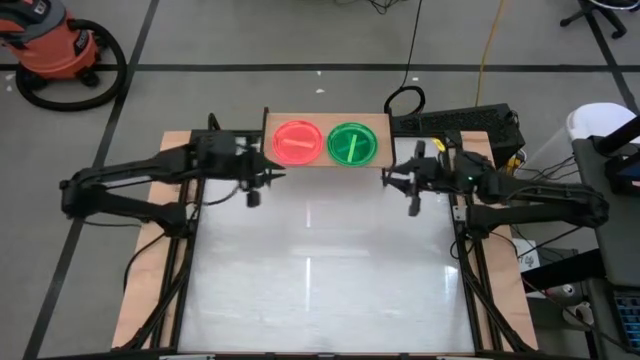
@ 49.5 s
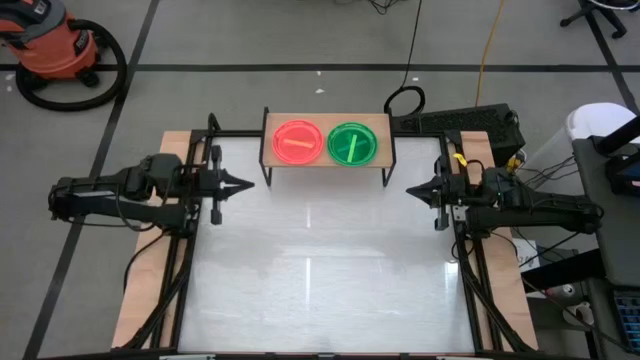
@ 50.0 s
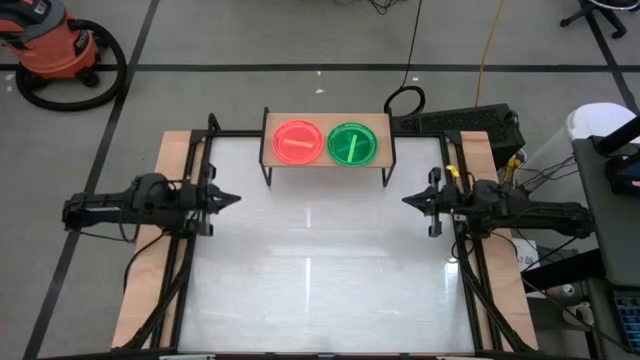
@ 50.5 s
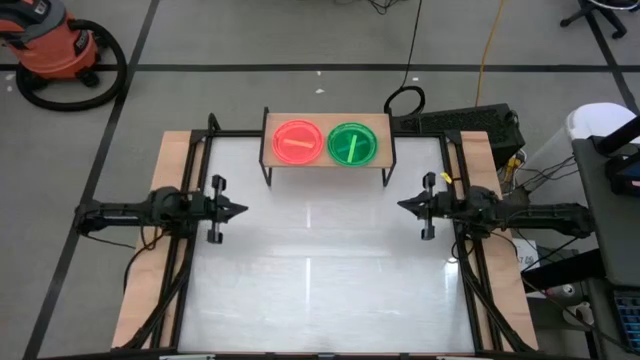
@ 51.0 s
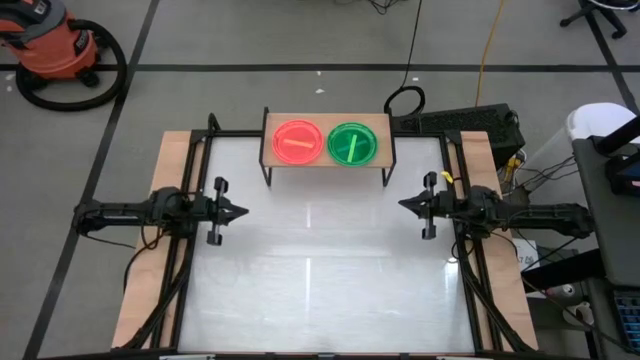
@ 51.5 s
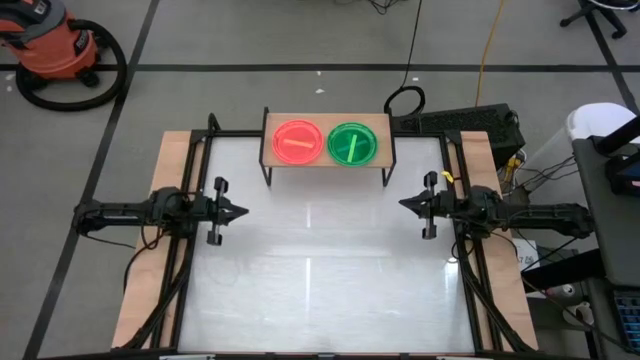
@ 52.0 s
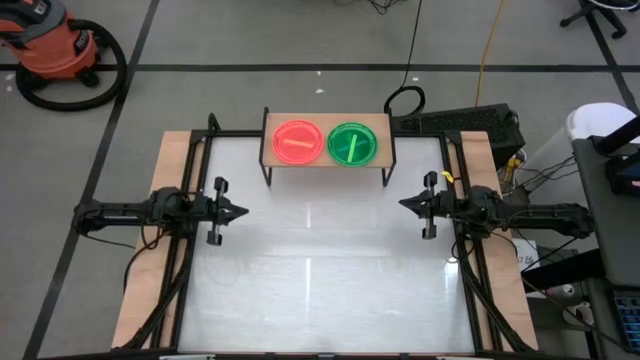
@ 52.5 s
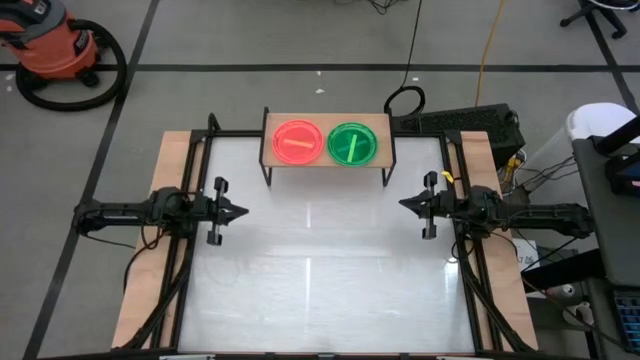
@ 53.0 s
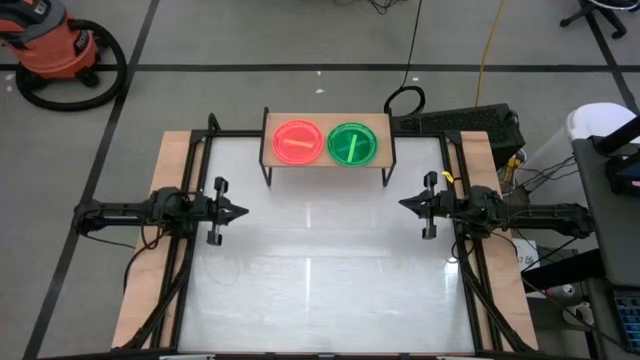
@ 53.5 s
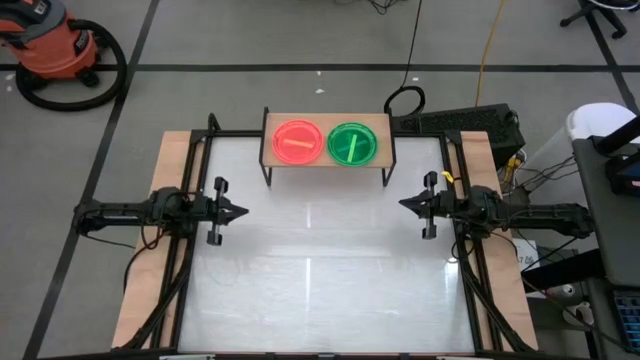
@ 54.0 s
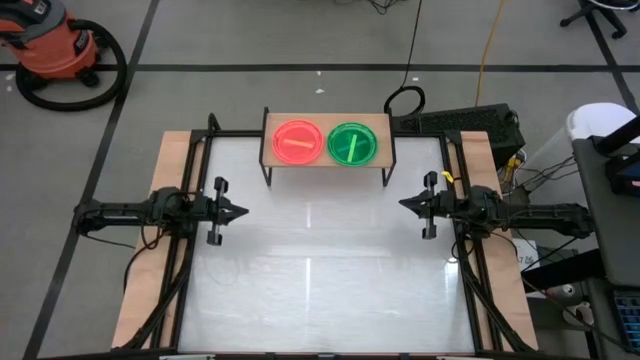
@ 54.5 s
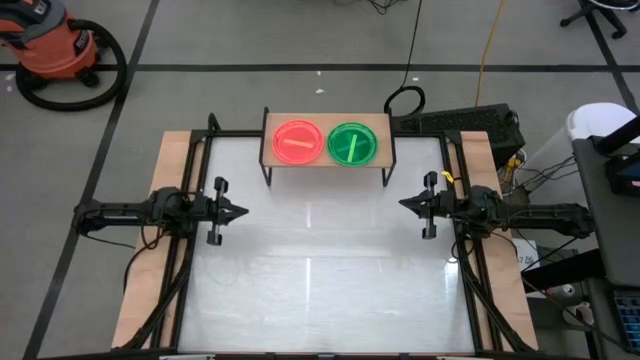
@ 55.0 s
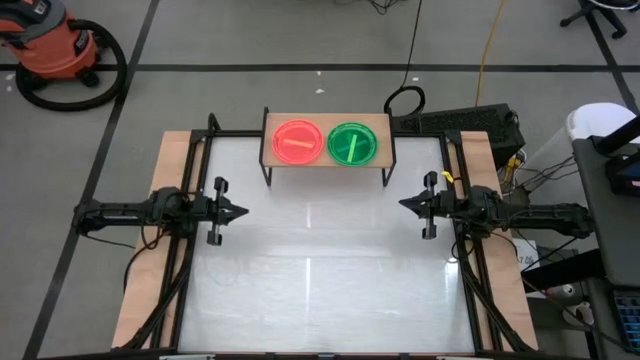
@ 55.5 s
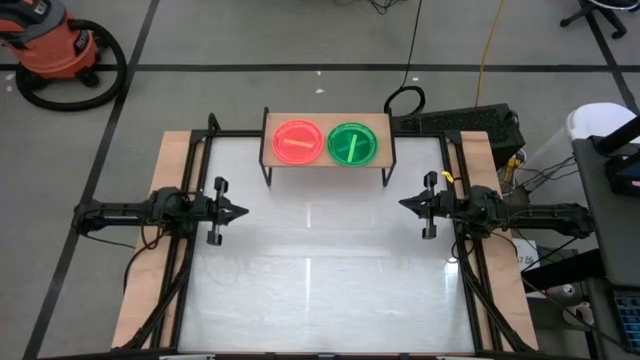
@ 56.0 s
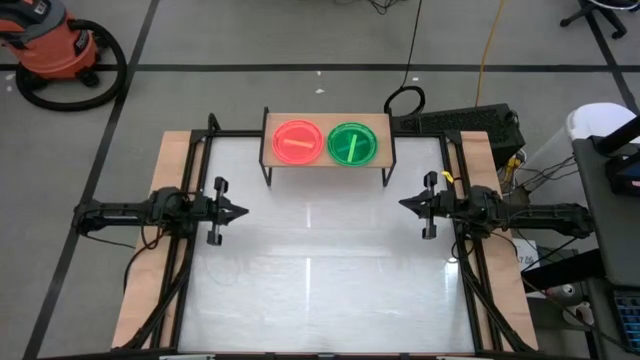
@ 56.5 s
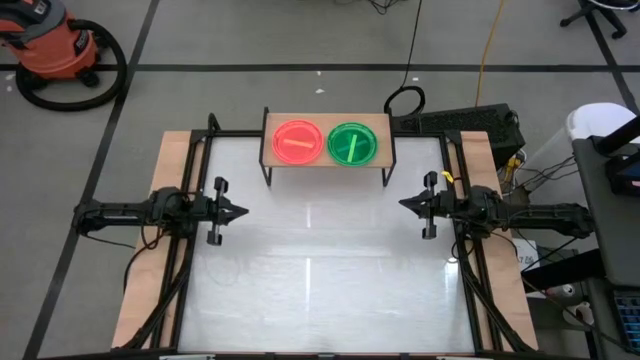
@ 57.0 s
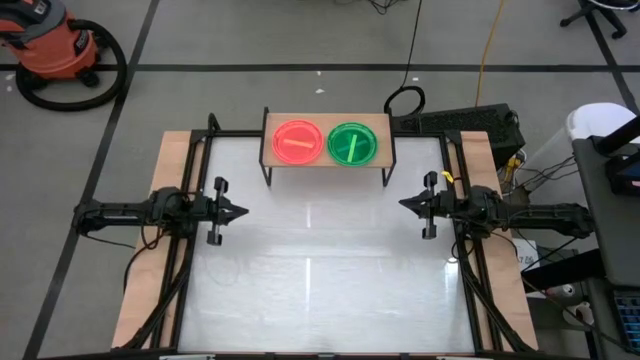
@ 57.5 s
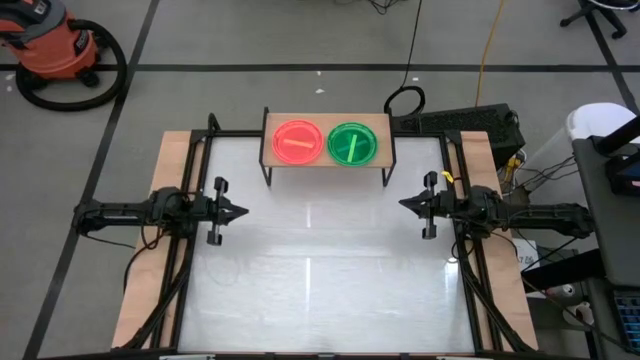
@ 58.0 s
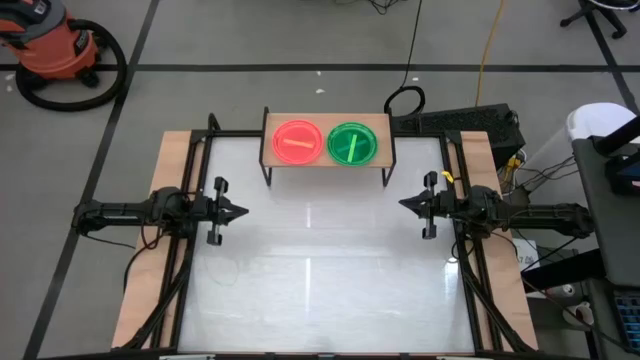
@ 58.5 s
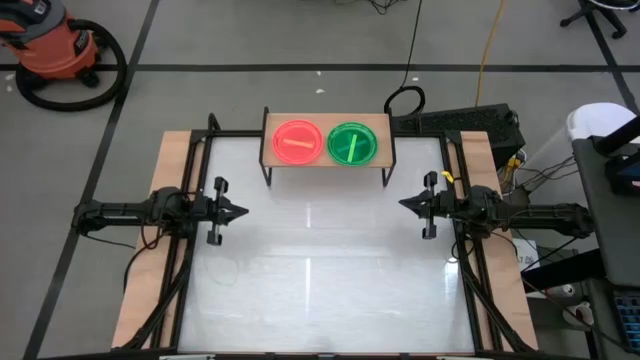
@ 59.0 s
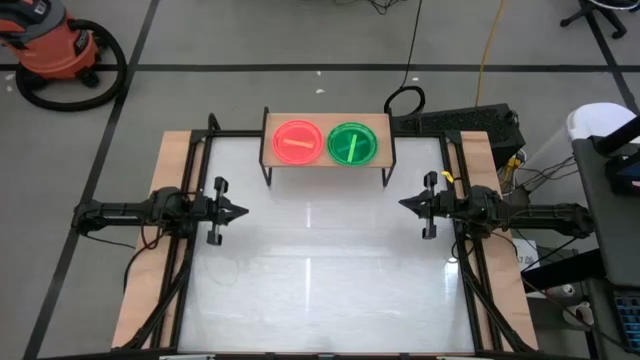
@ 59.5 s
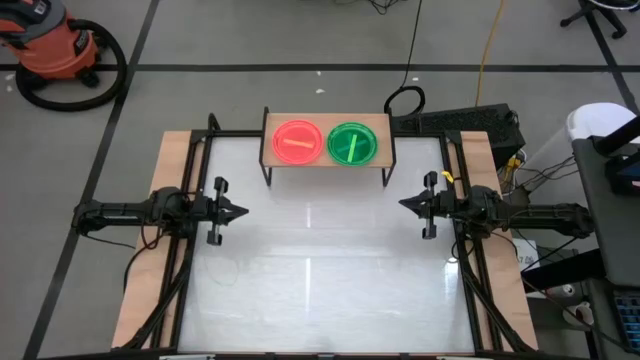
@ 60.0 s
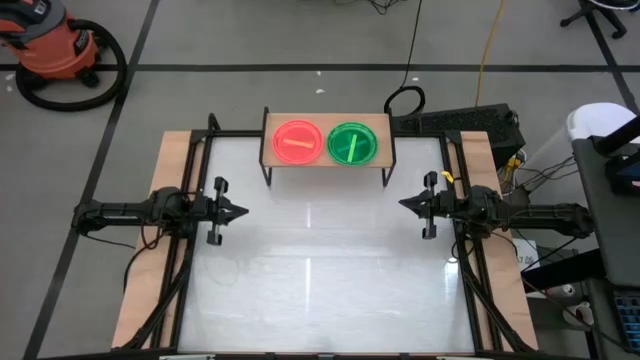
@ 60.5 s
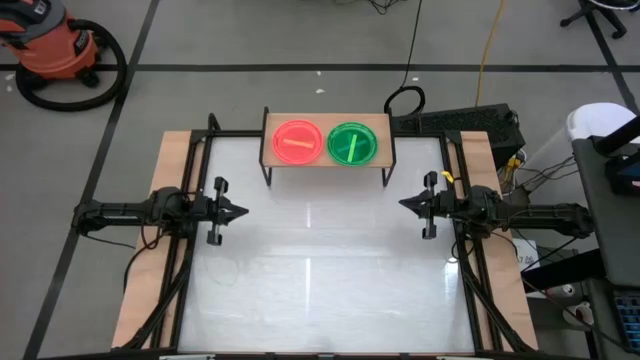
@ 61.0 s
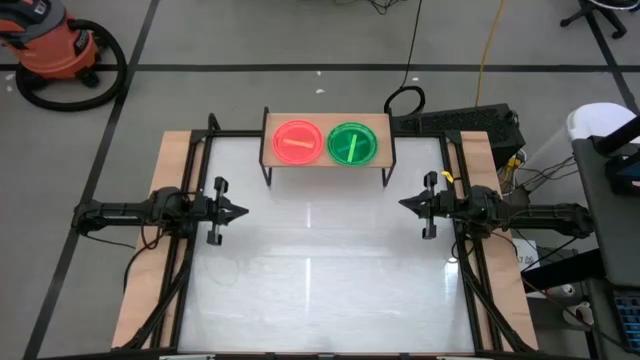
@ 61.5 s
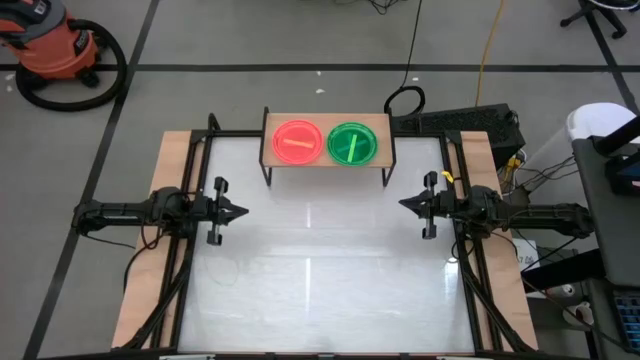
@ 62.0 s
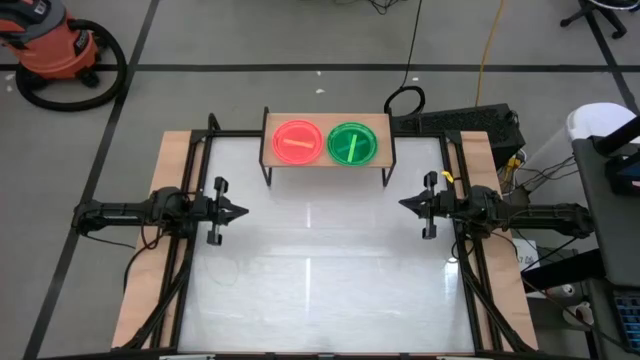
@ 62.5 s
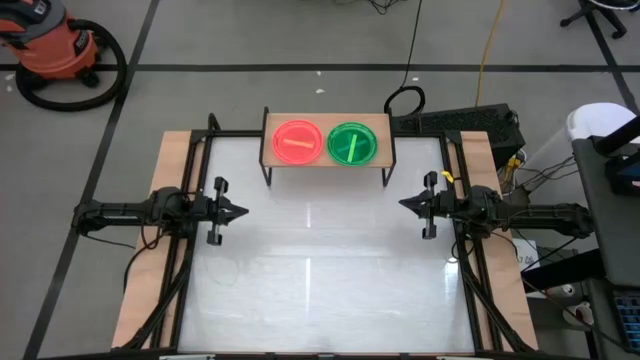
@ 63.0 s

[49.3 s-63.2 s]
Task: Place and stack plates onto a shelf
Return to Home Position

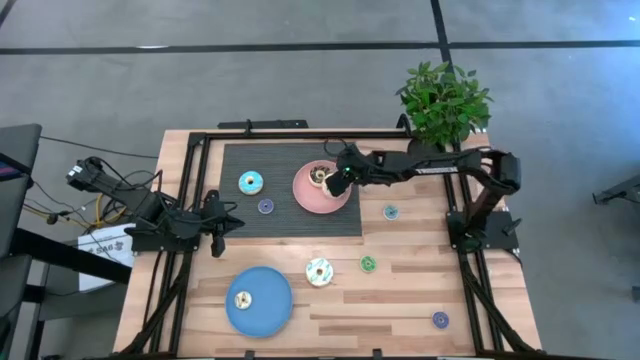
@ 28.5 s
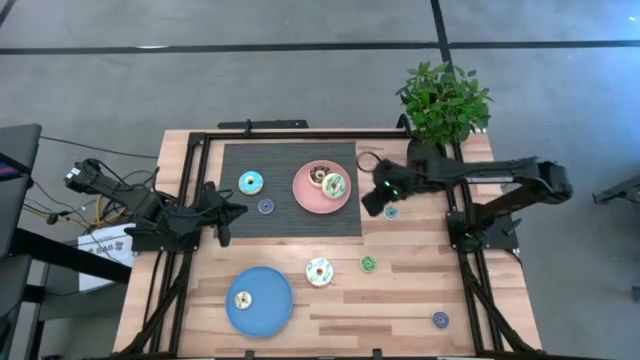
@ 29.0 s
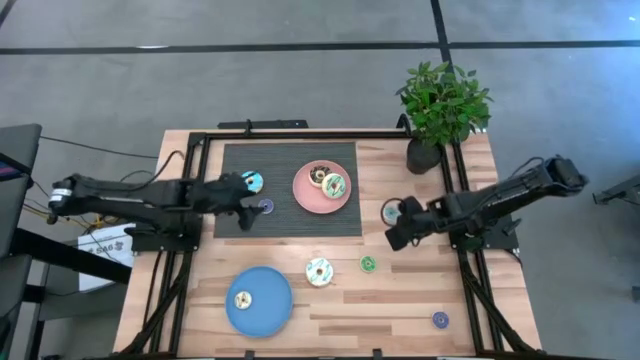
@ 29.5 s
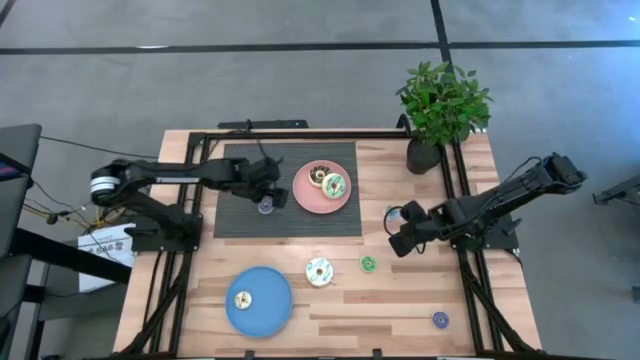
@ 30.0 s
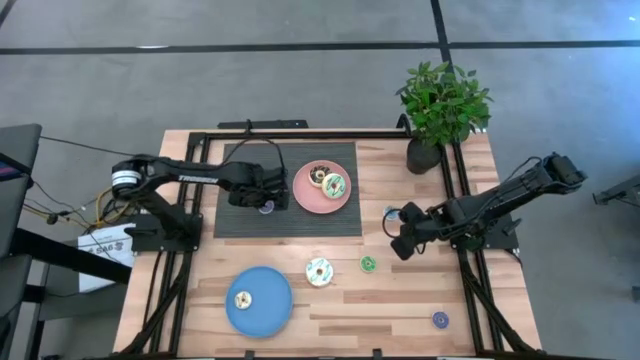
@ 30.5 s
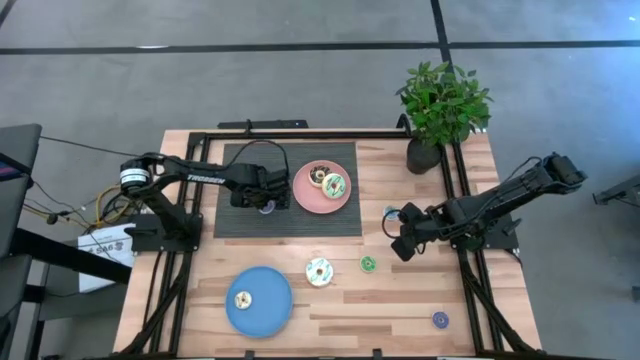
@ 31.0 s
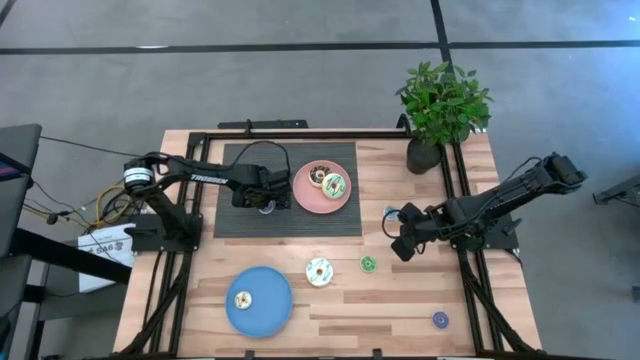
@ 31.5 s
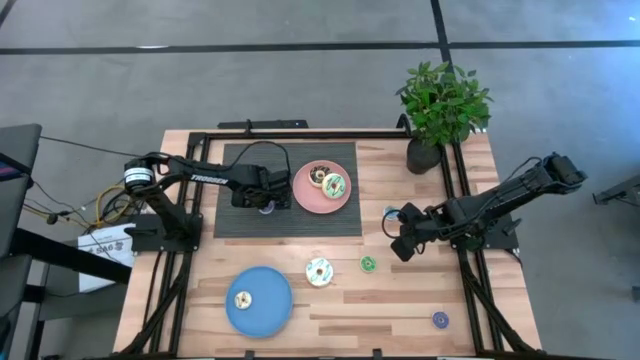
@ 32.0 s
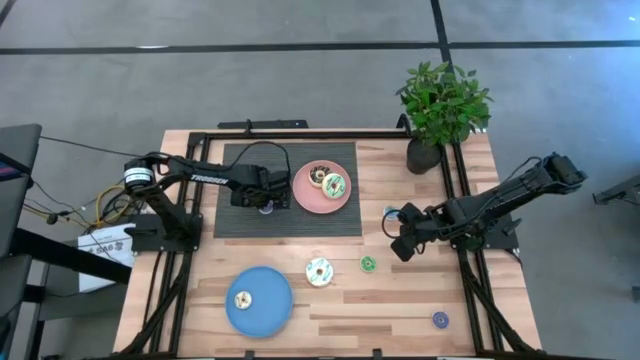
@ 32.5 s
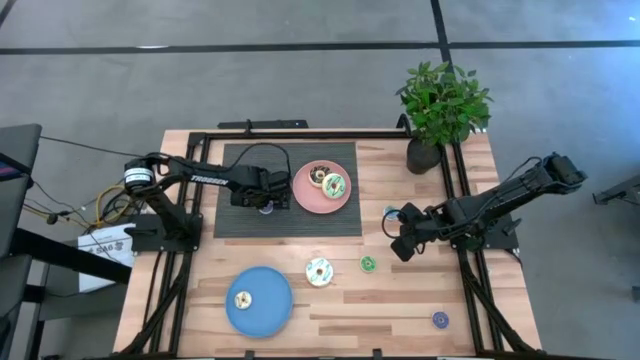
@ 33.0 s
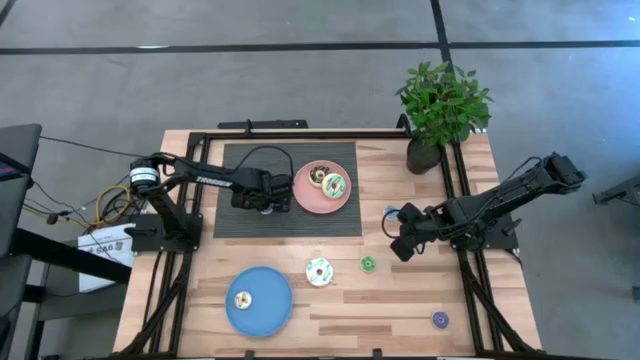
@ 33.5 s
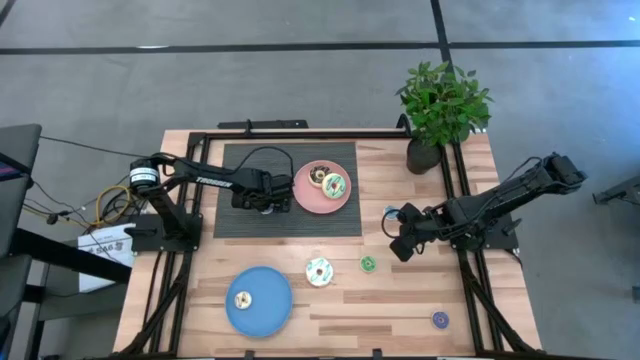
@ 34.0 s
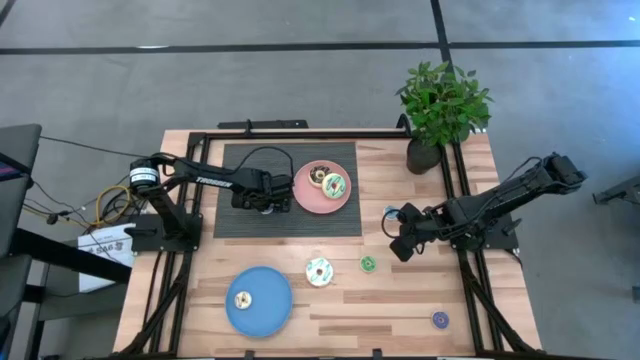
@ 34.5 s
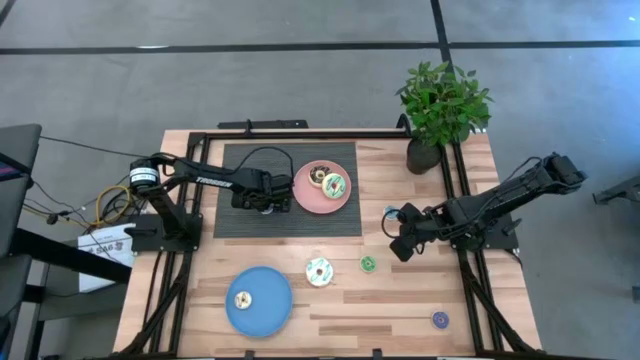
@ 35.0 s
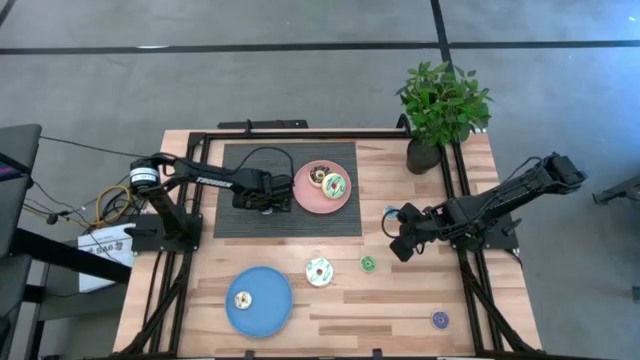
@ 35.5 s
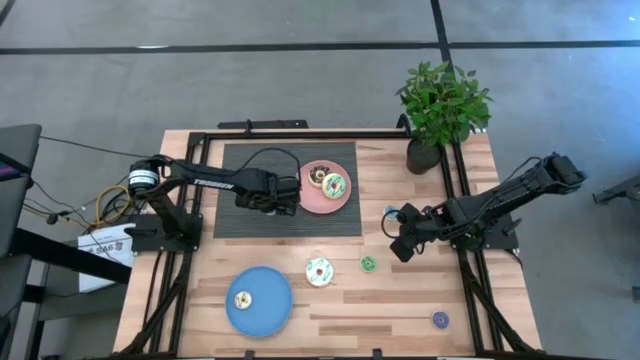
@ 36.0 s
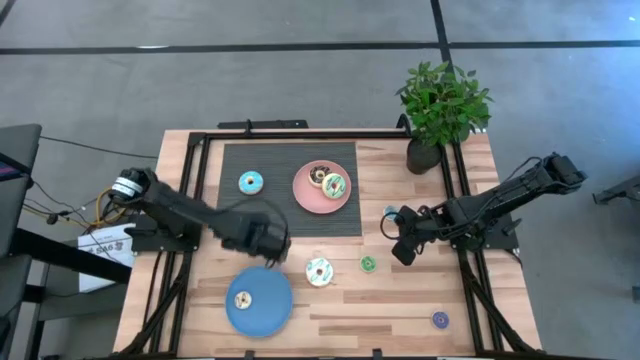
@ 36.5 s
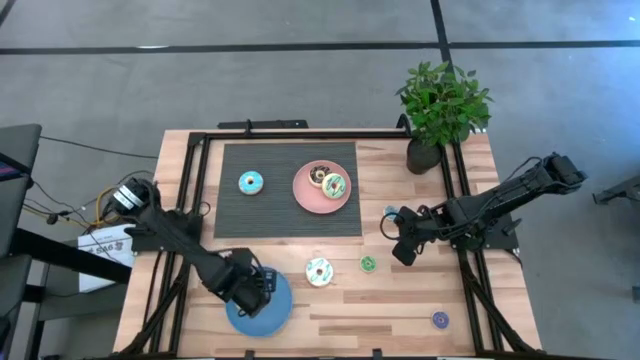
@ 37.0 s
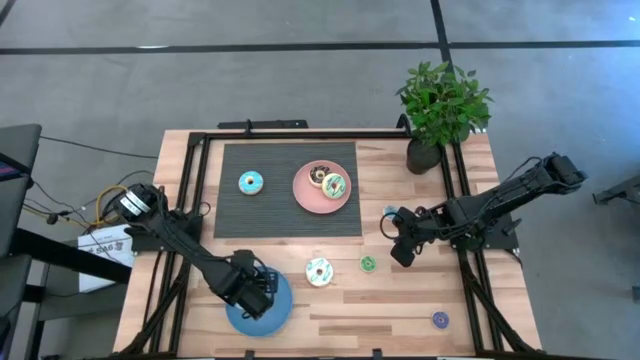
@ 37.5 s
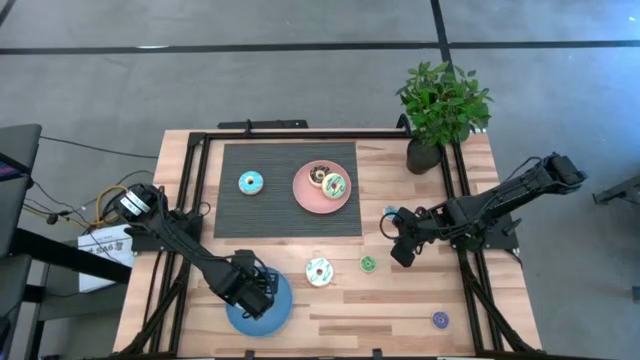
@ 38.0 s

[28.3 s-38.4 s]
Task: Pick & Place donuts
Put the top small purple donut on the blue plate
